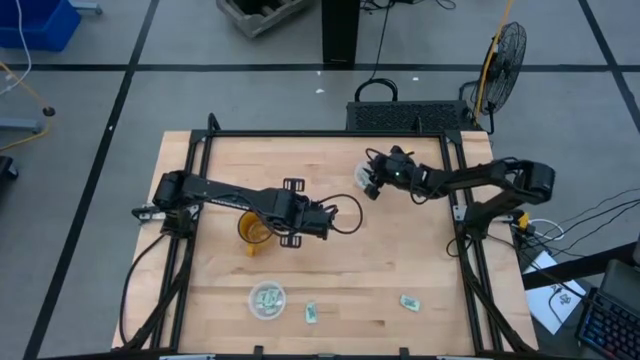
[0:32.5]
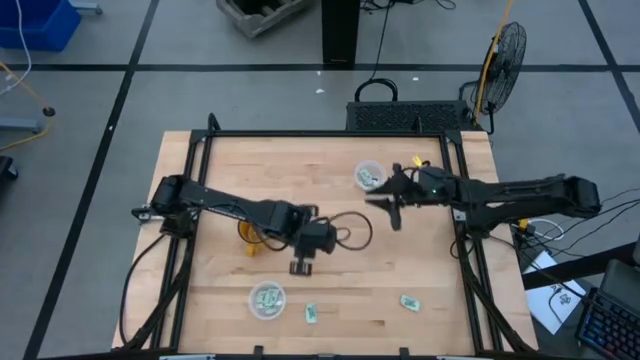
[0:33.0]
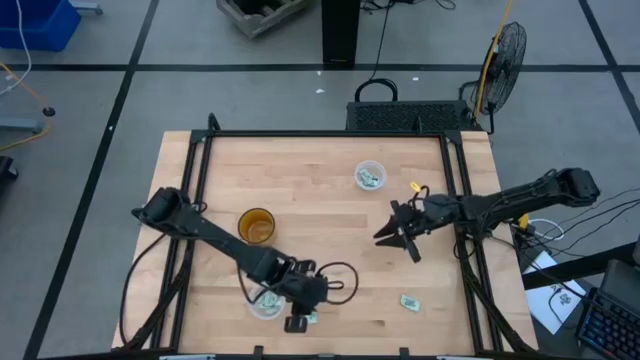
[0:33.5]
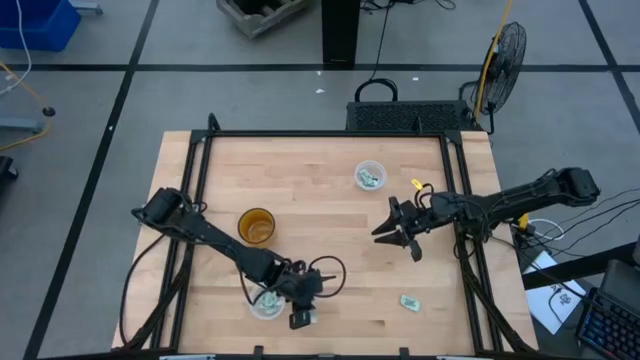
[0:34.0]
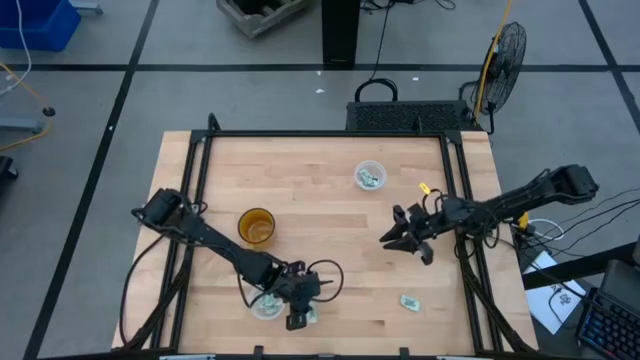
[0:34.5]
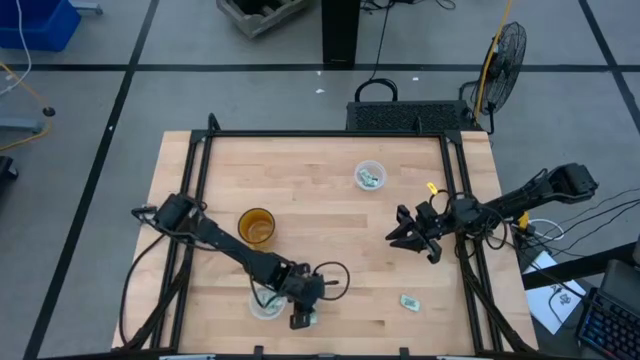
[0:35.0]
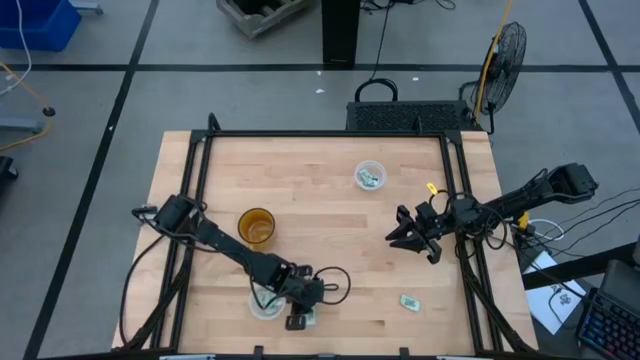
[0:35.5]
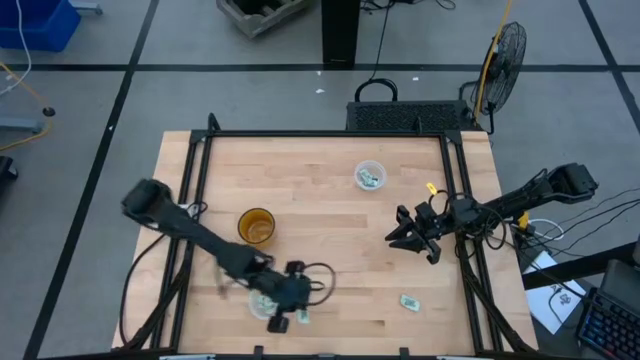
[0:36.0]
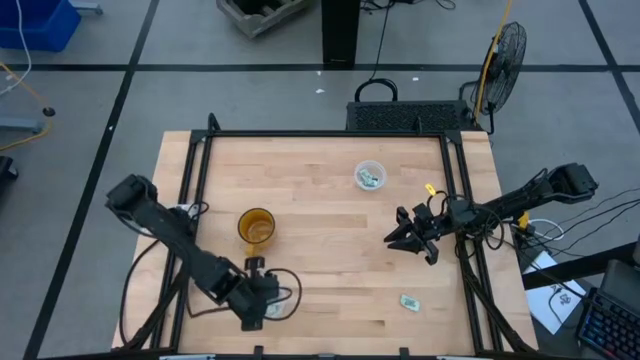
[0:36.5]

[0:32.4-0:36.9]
Task: Pick and place items into bin
Put the green stevia packet into the bottom transparent bin

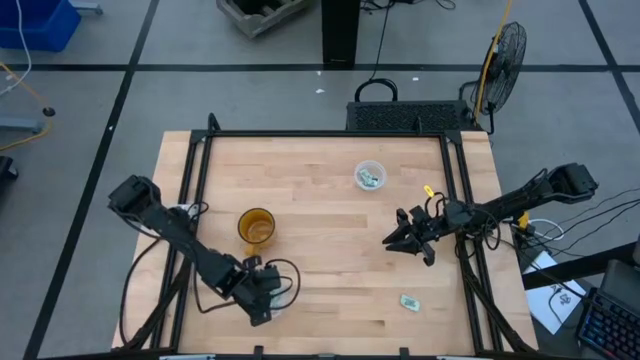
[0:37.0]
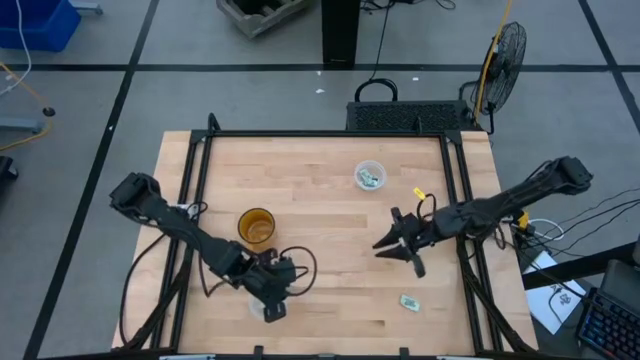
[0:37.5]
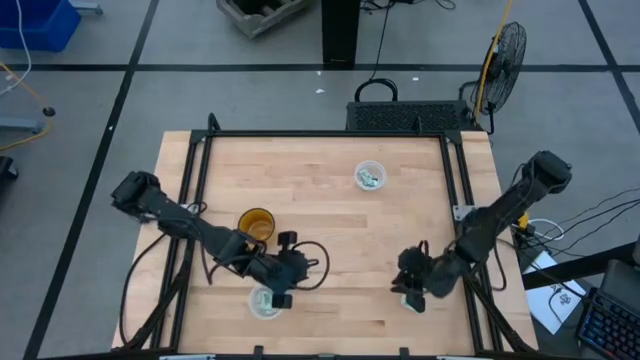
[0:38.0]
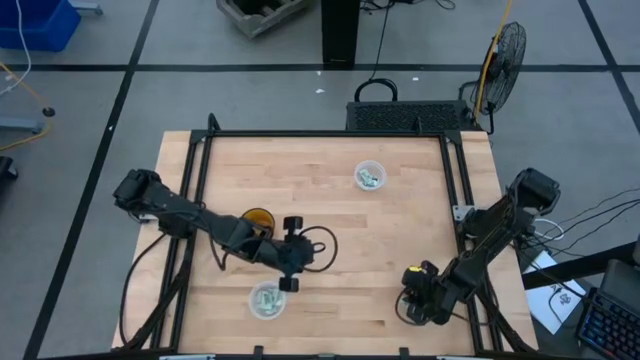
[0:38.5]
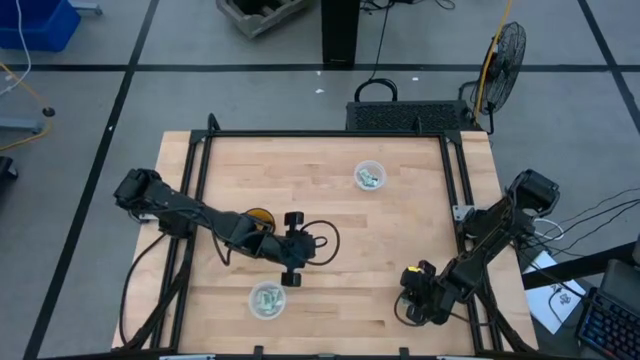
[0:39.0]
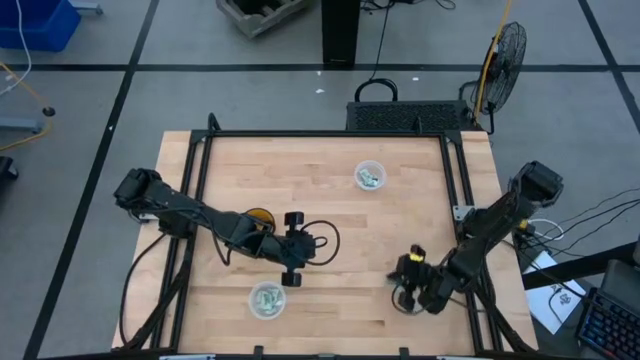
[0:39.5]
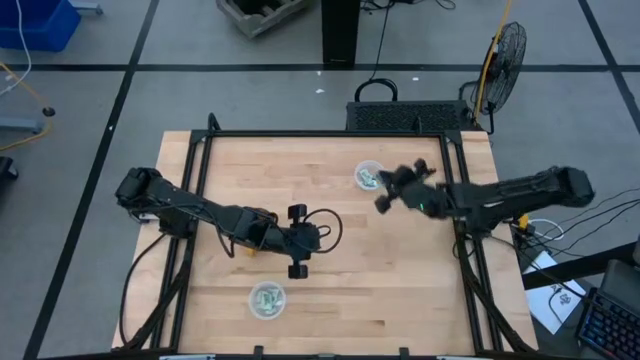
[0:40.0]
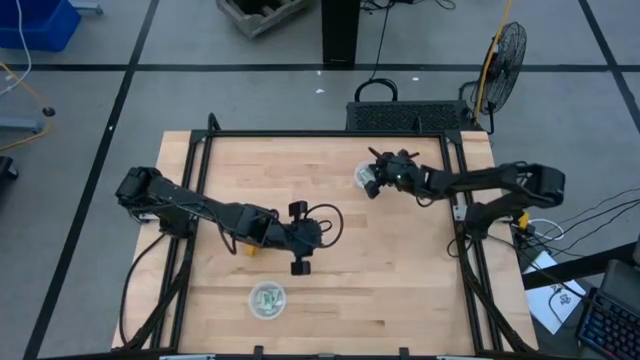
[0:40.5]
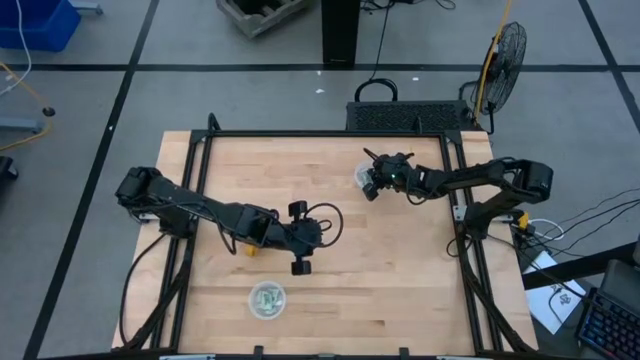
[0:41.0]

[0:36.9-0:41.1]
Put the green stevia packet into the top transparent bin

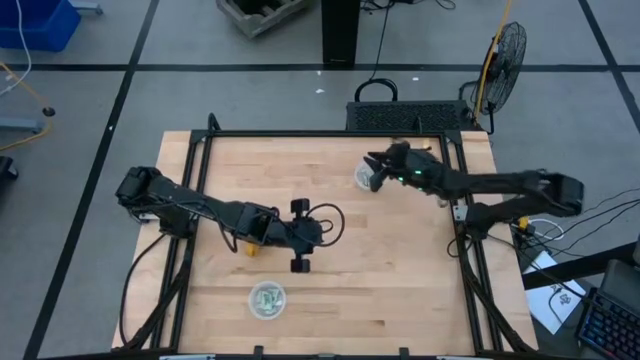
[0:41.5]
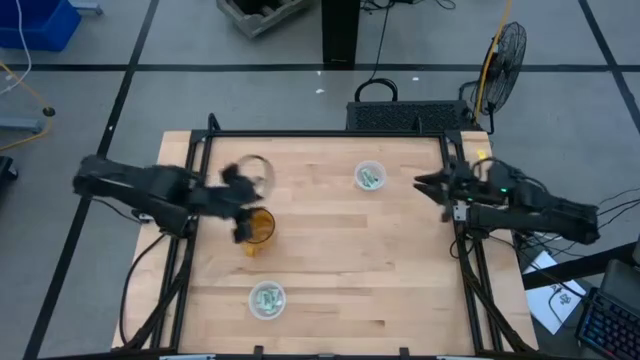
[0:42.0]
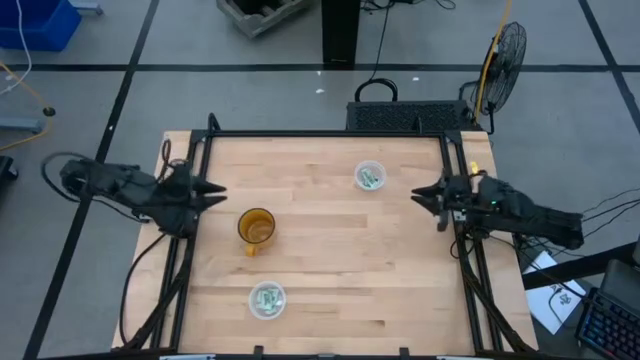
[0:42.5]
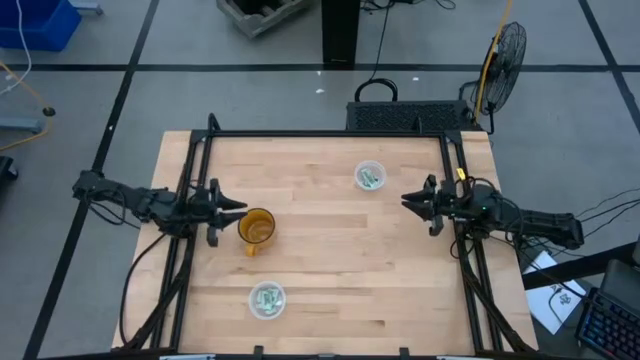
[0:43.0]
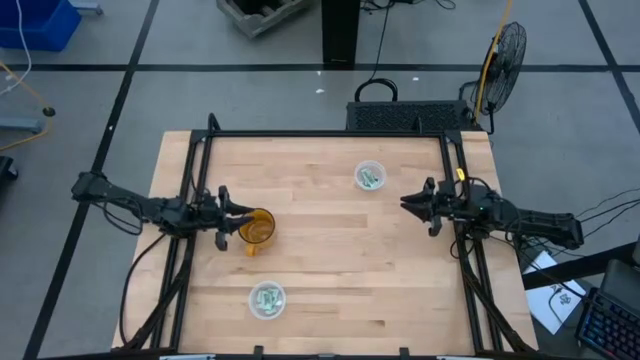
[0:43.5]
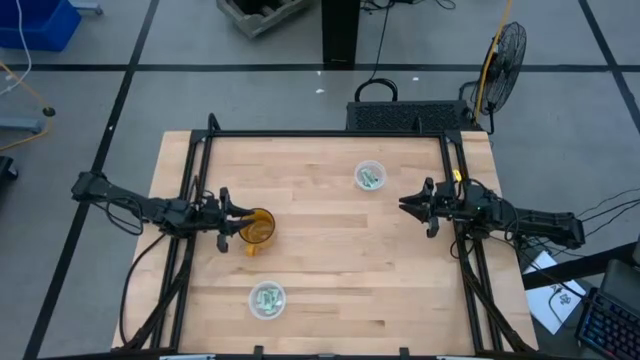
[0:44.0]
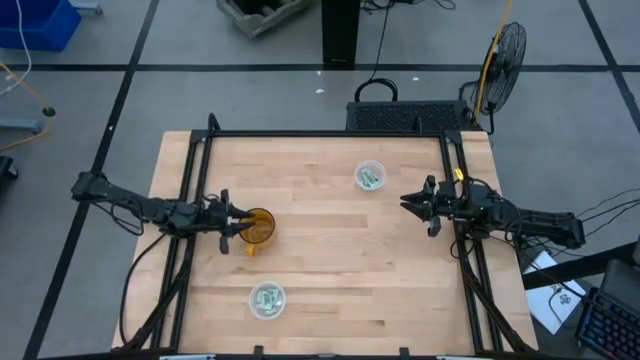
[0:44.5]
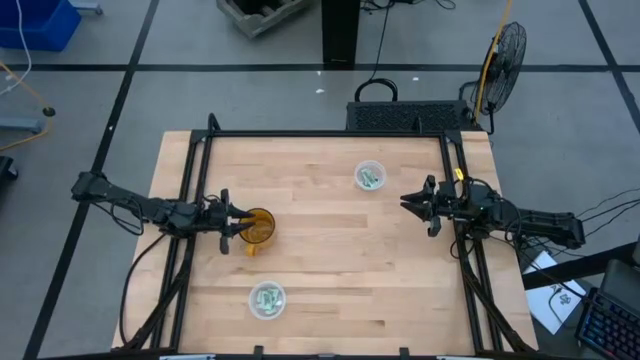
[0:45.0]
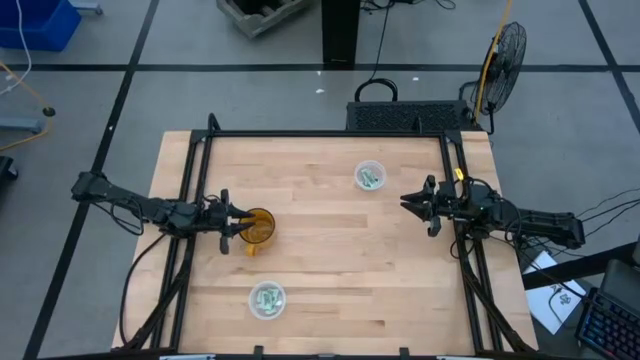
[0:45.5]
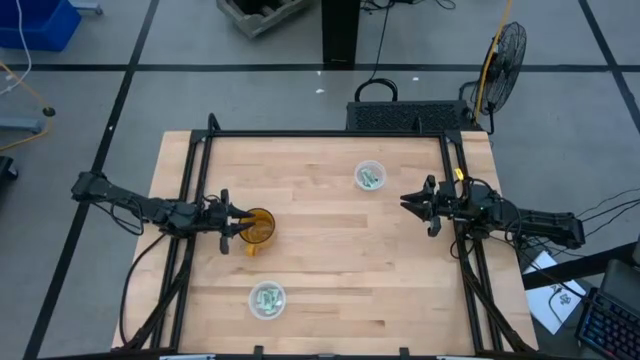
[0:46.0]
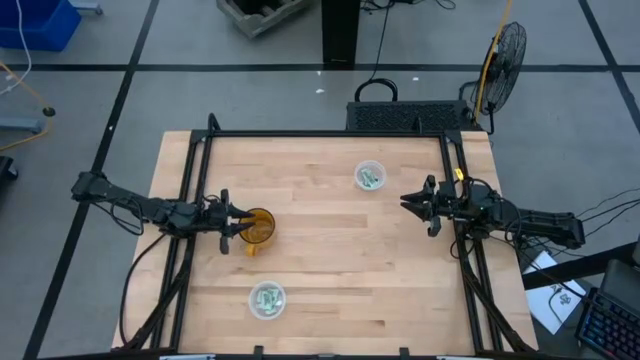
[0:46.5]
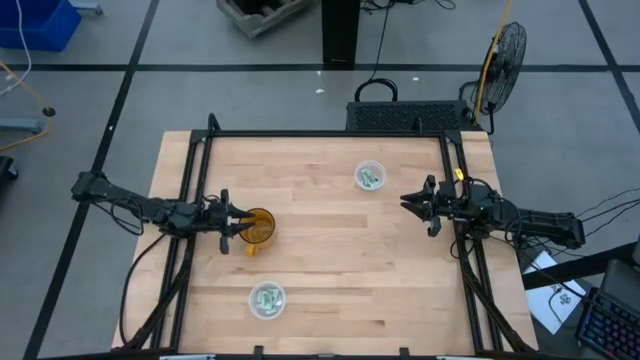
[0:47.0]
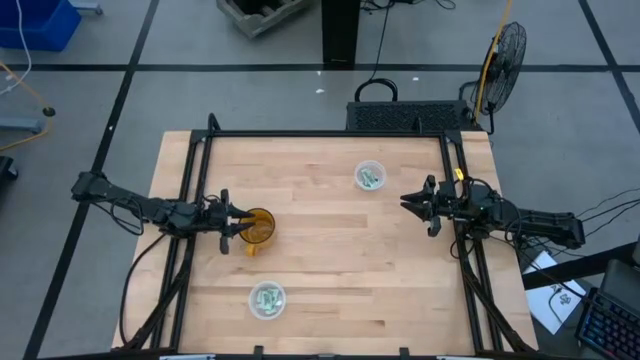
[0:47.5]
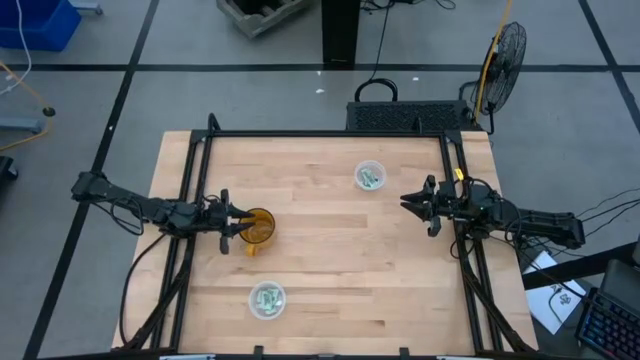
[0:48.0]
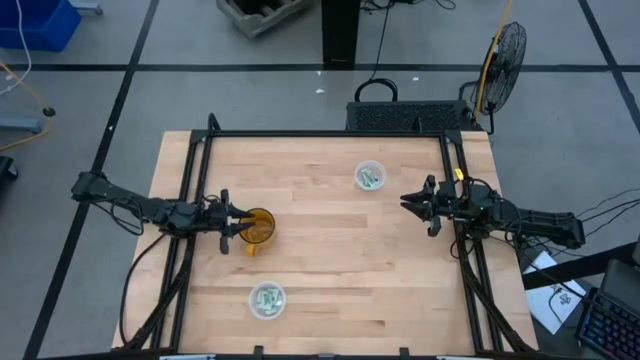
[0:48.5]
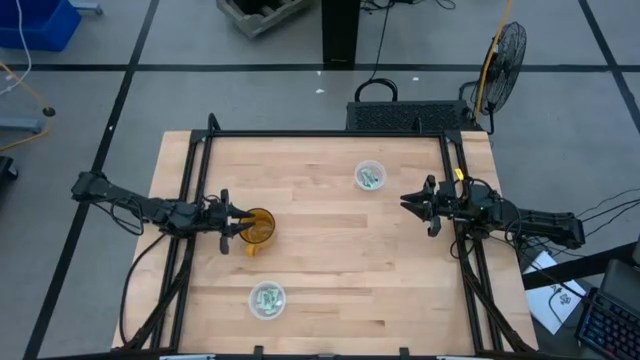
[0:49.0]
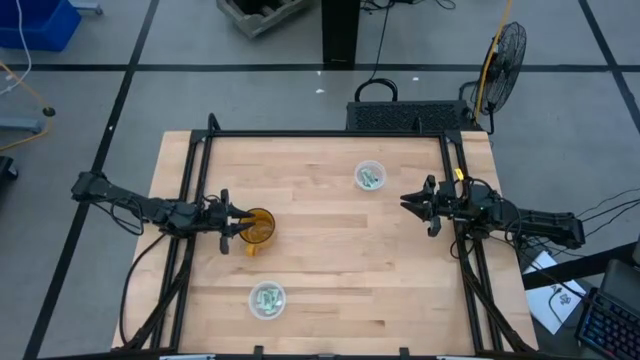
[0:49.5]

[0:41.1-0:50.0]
Return to Home Position

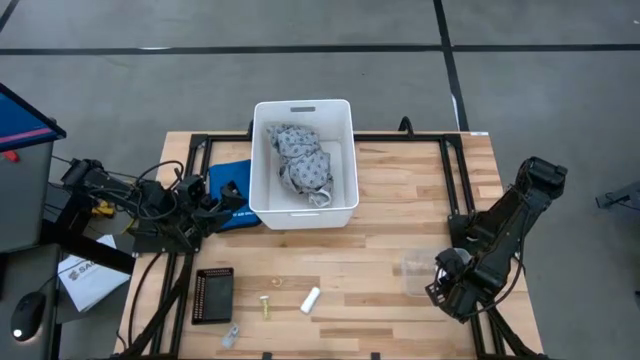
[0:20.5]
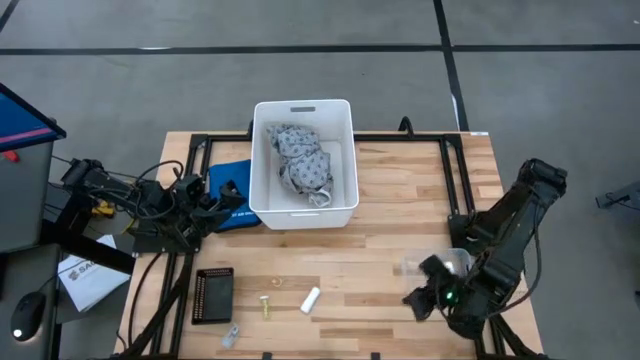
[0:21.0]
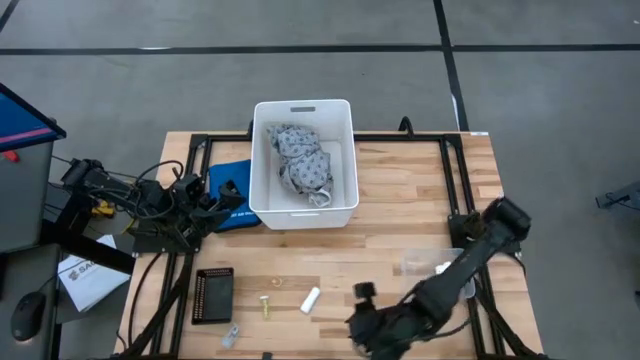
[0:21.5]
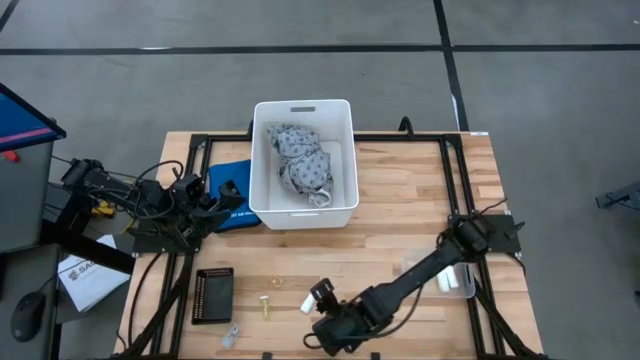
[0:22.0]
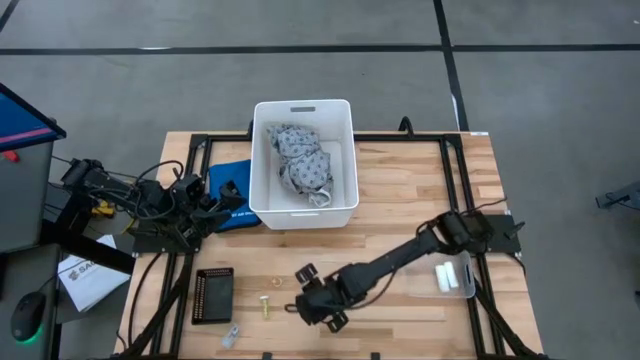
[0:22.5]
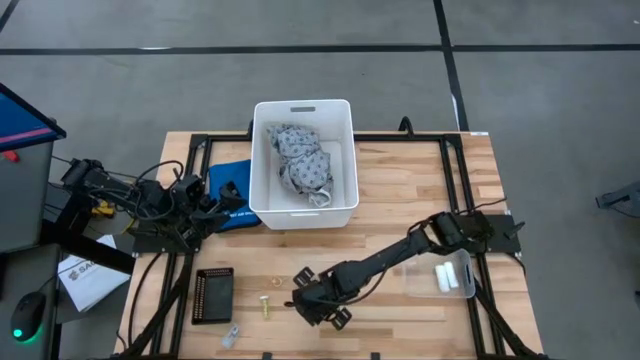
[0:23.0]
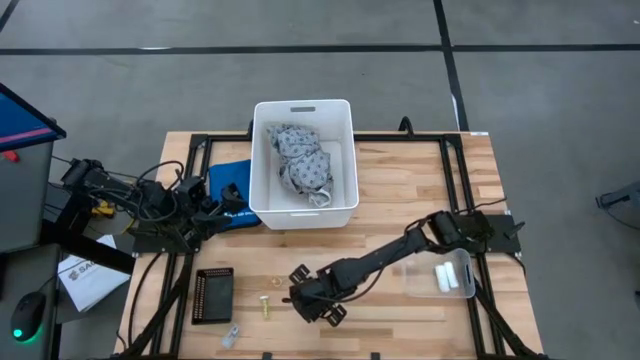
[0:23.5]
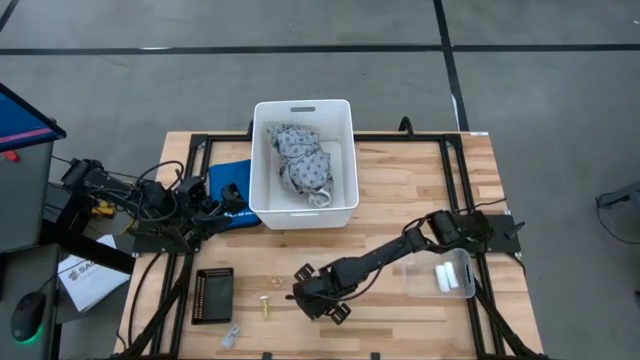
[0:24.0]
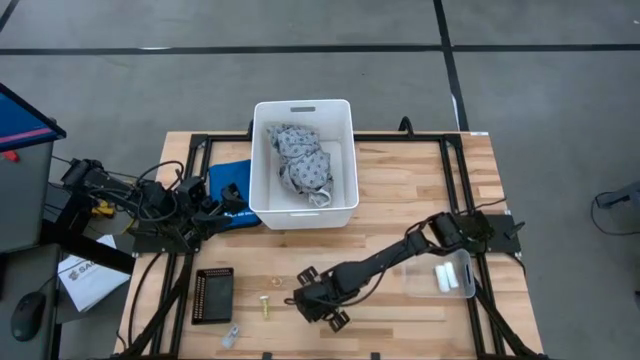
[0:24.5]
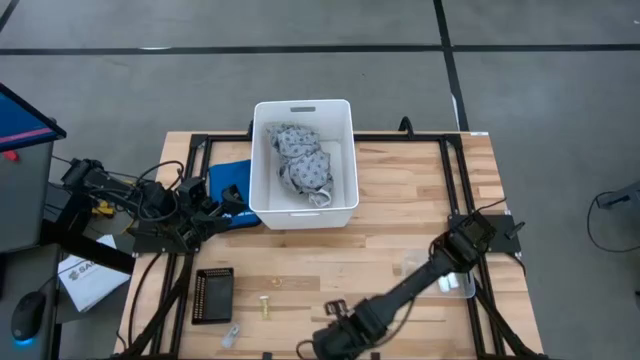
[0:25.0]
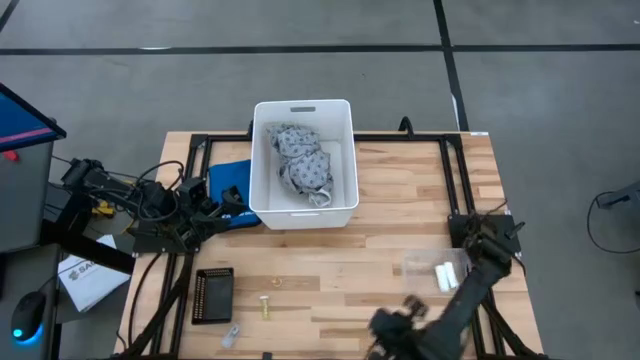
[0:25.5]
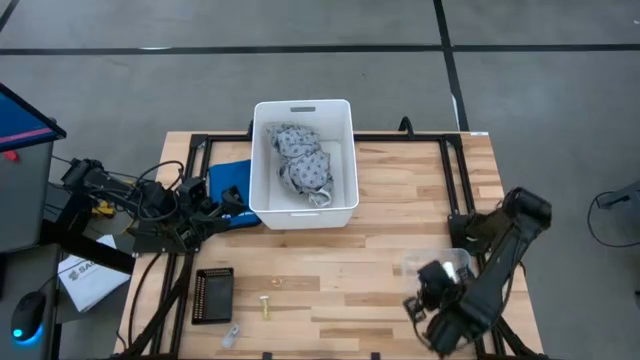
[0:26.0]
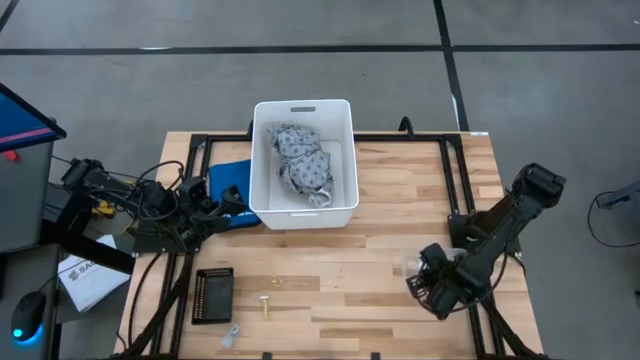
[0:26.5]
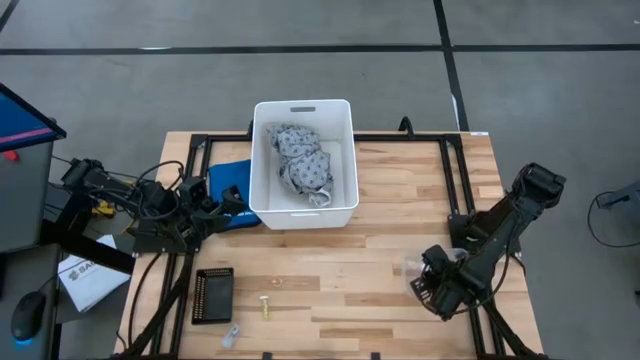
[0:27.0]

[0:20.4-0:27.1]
Task: Pick & Place Medicine items
Put the rolled gauze into the transparent bin
